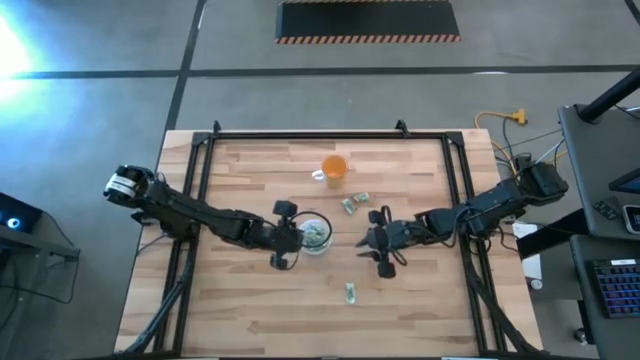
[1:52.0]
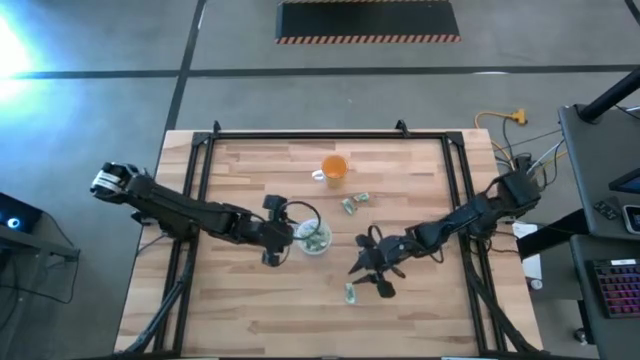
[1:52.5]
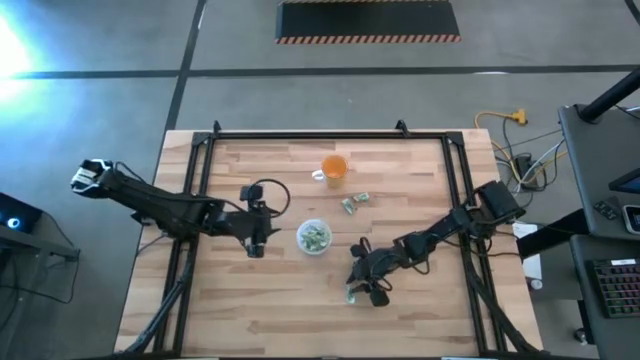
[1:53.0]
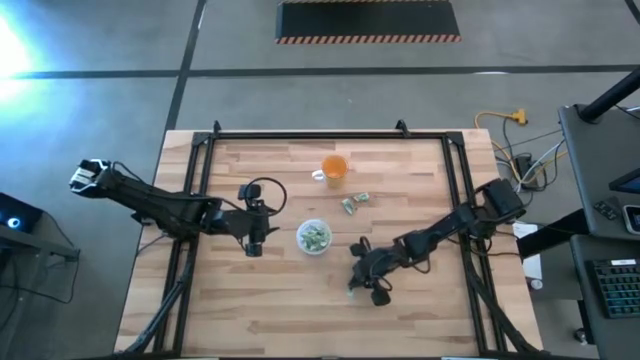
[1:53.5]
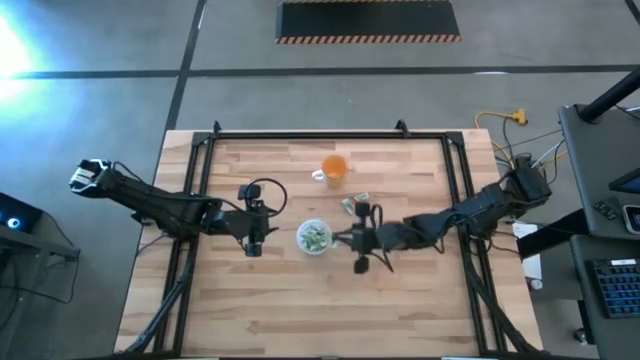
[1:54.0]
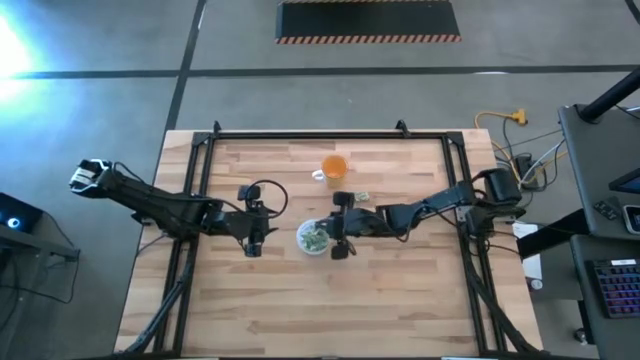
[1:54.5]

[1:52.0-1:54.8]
Task: Pick and place Stevia / Truvia into bins
Put the green stevia packet into the transparent container

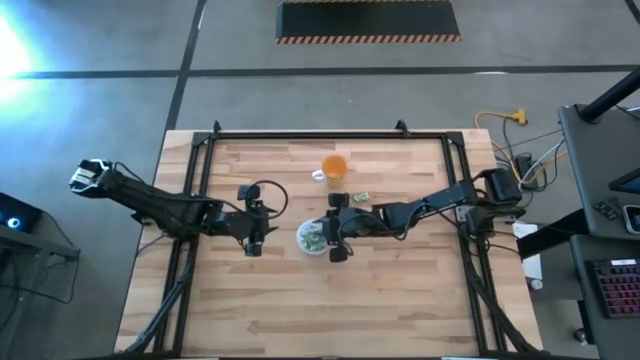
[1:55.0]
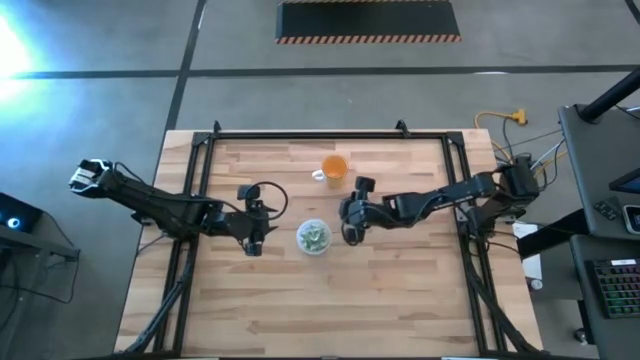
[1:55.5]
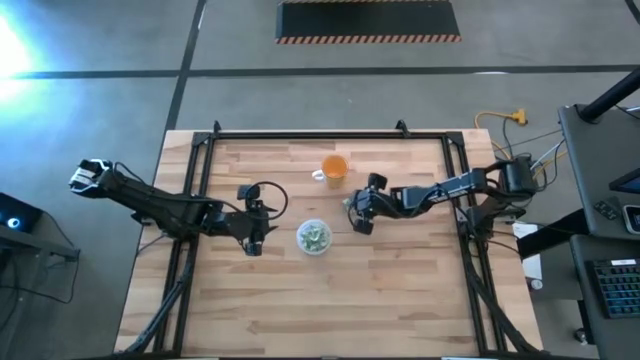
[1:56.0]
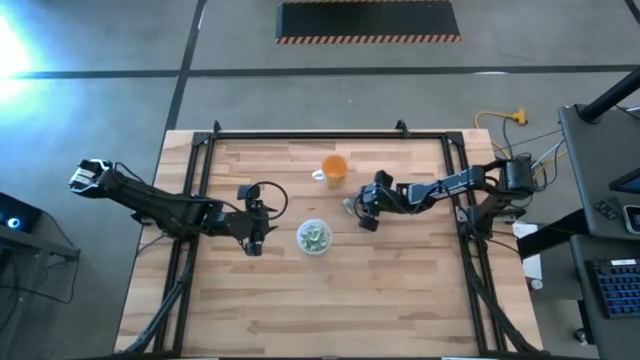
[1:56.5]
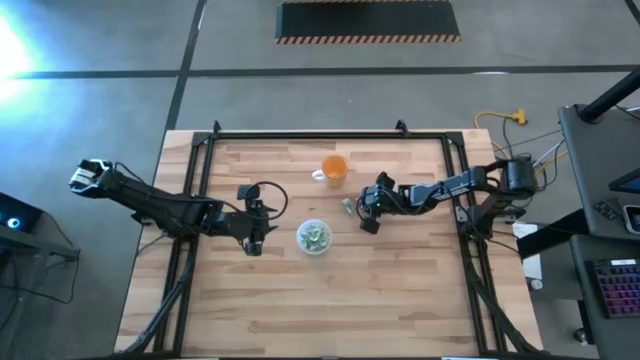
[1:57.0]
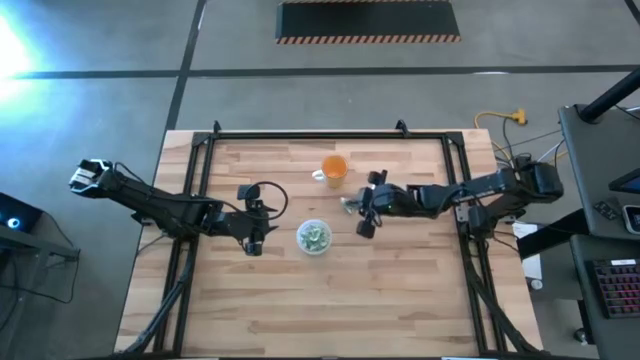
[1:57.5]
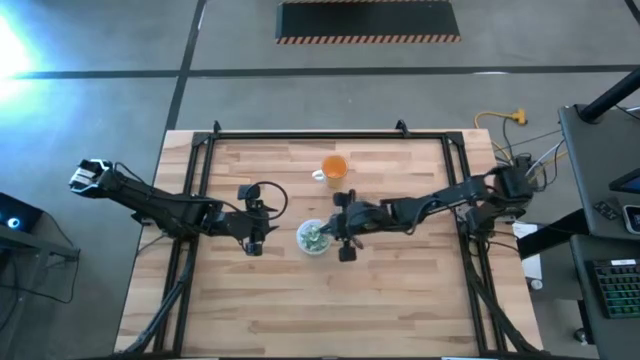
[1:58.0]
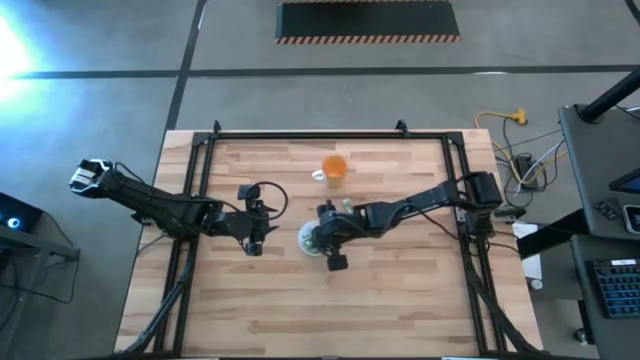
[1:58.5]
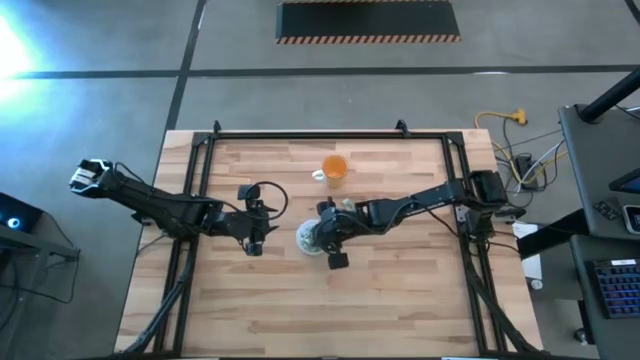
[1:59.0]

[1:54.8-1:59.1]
Put the green stevia packet into the transparent container

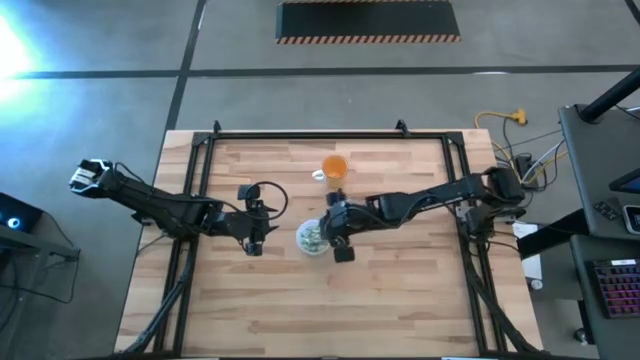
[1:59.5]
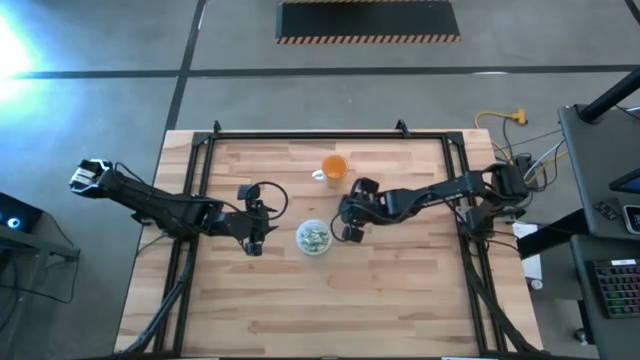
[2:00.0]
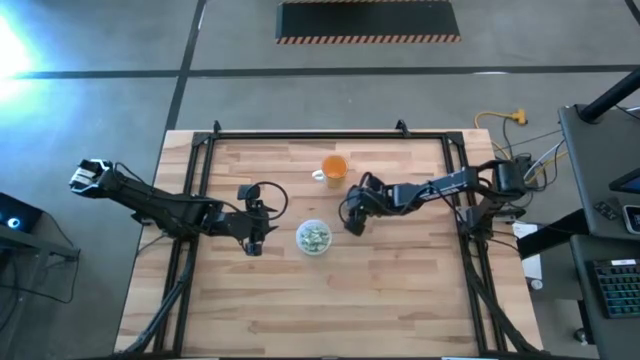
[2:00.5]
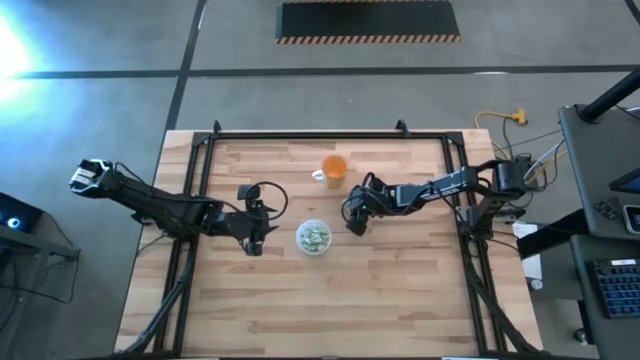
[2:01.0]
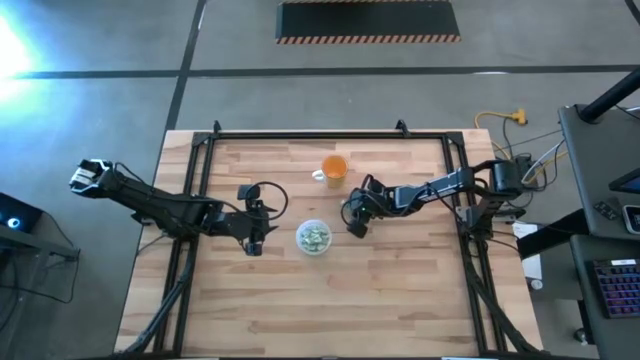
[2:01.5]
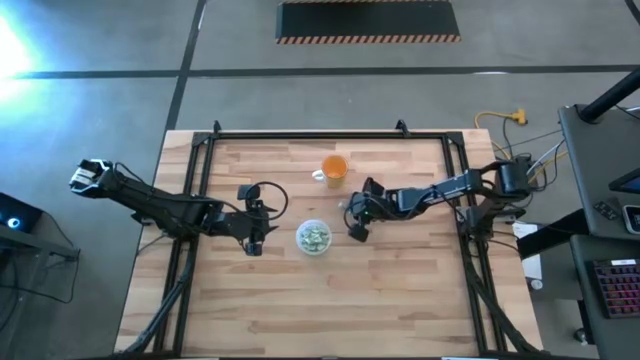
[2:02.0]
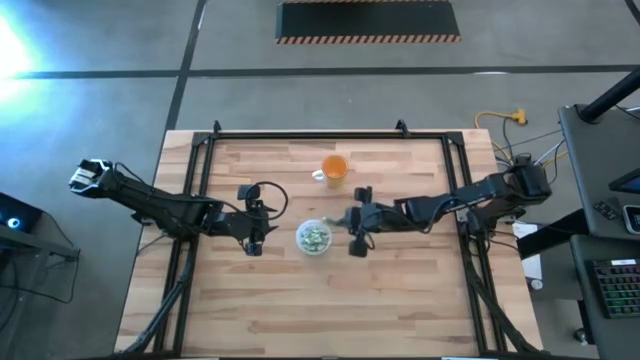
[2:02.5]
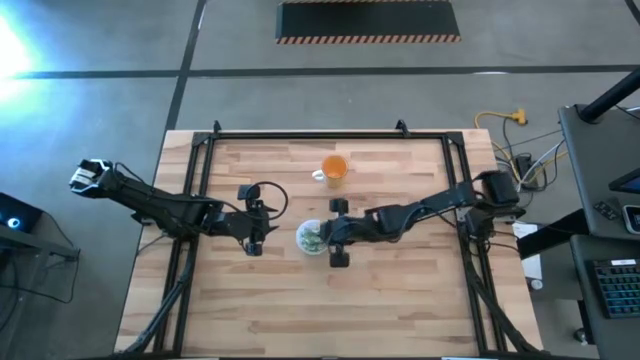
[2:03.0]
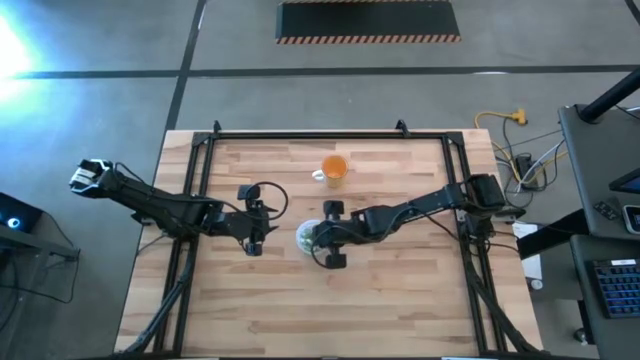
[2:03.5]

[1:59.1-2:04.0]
Put the green stevia packet into the transparent container

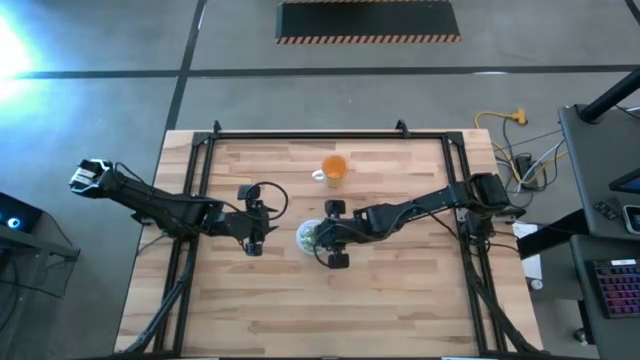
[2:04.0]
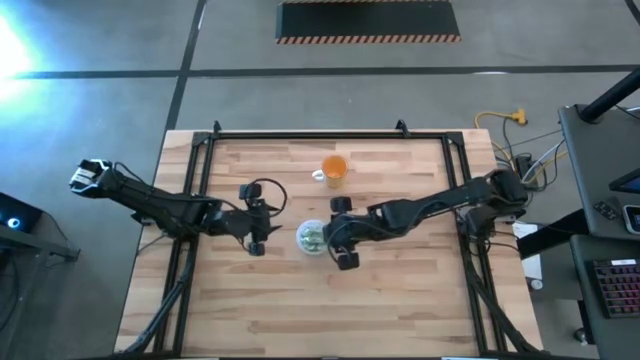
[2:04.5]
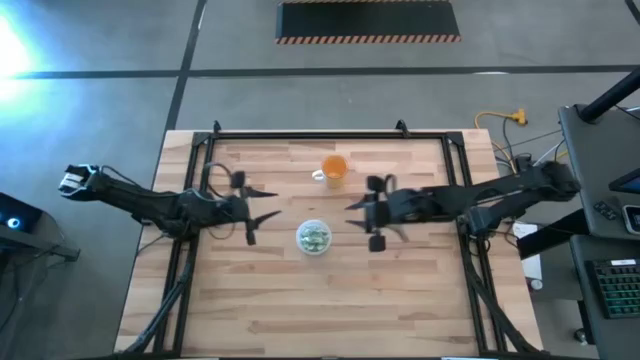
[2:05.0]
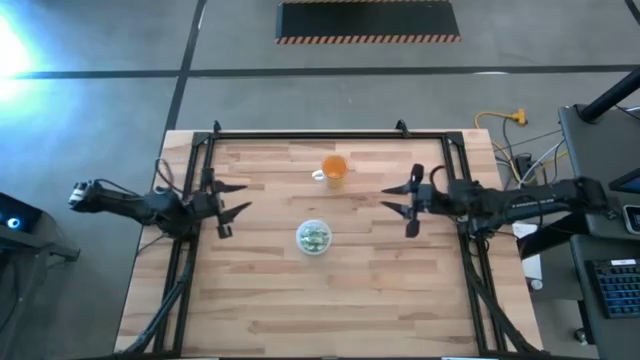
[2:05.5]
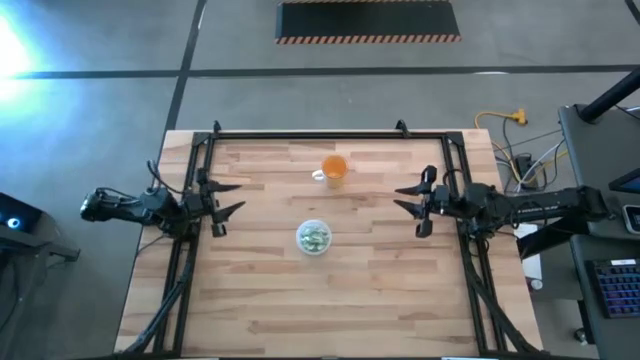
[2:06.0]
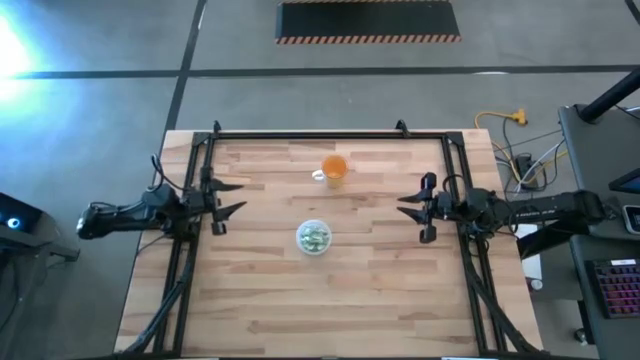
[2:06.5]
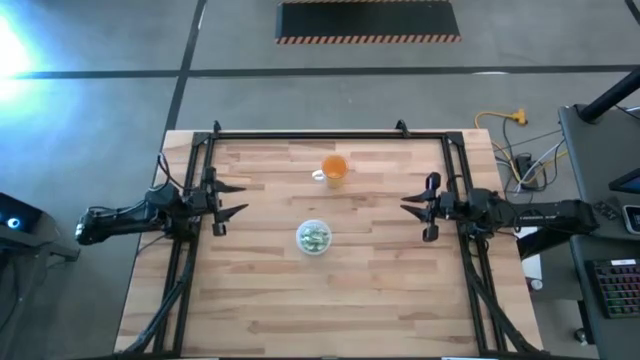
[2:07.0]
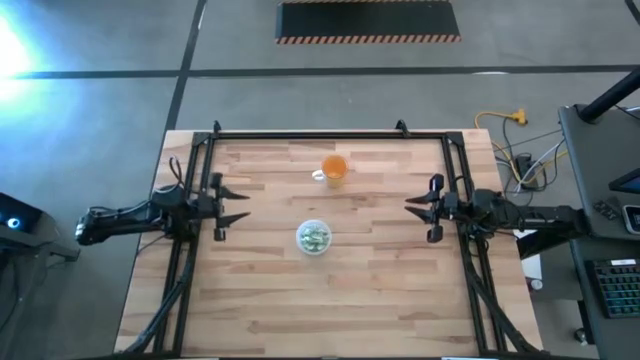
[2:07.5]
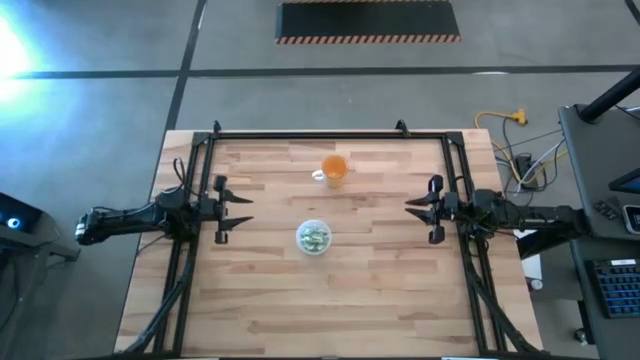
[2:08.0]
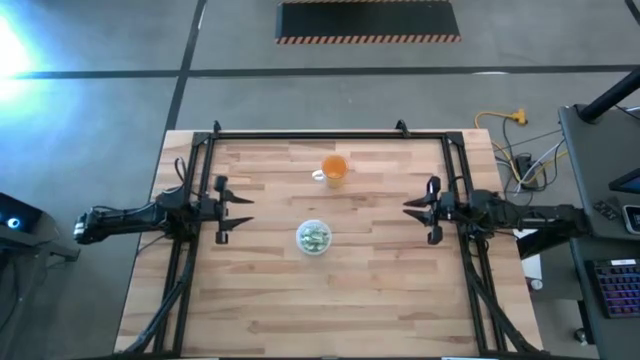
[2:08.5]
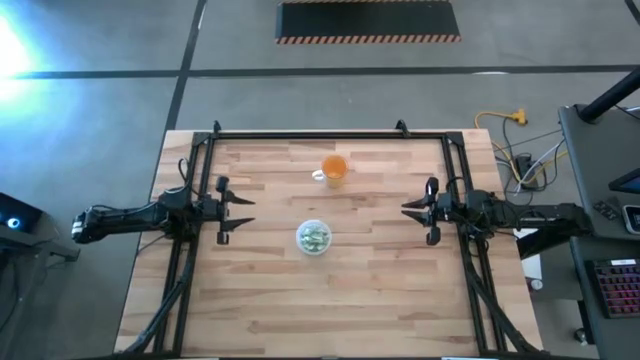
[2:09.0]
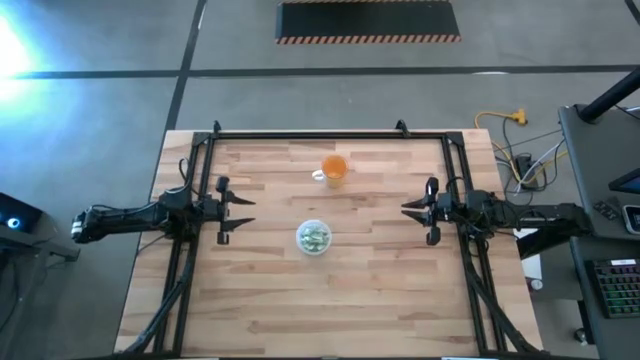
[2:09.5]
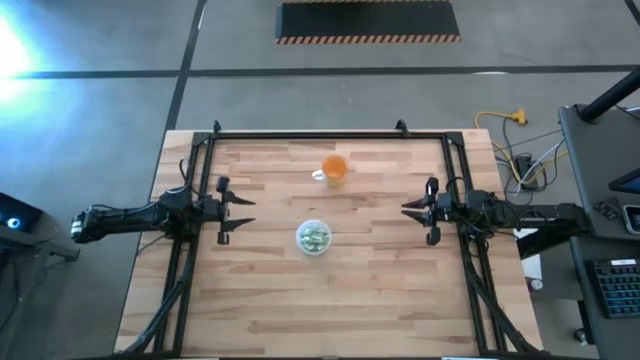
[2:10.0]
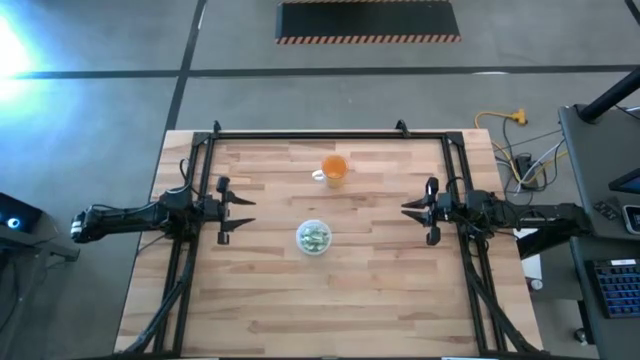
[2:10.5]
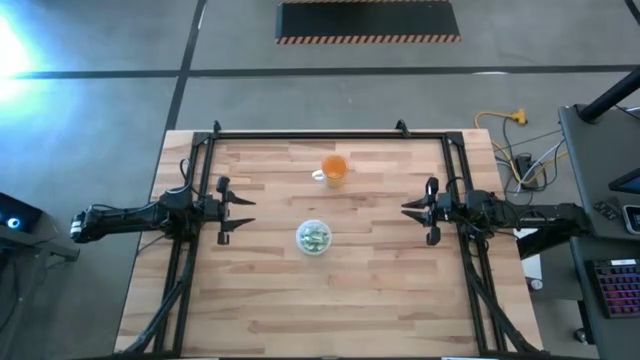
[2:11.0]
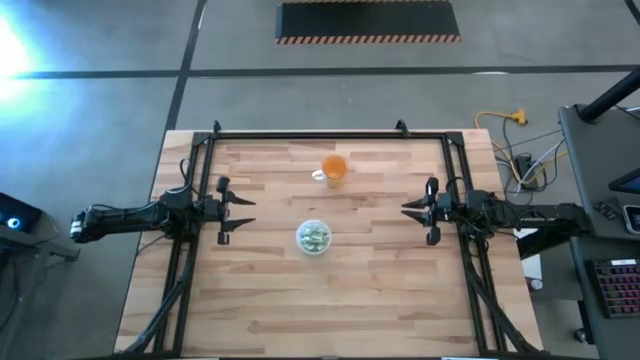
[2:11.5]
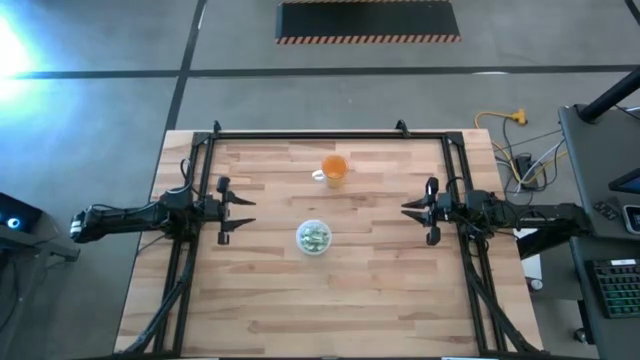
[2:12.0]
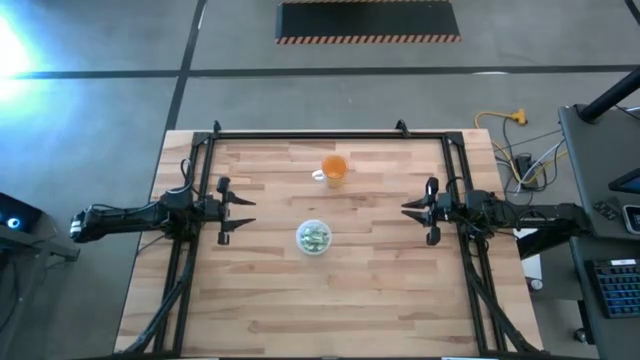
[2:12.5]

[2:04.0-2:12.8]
Return to Home Position
